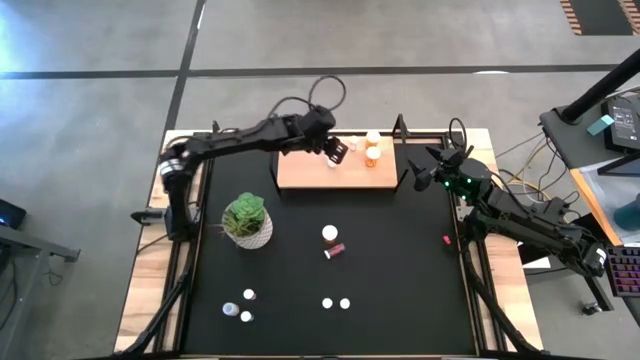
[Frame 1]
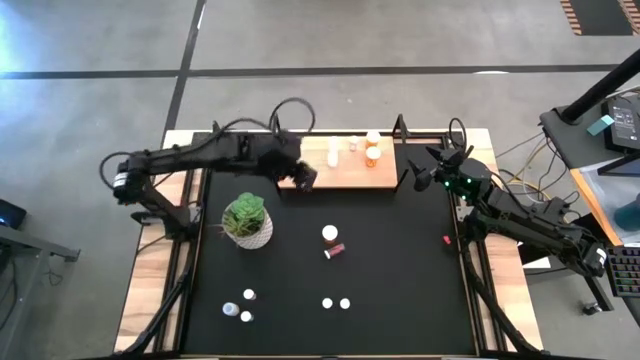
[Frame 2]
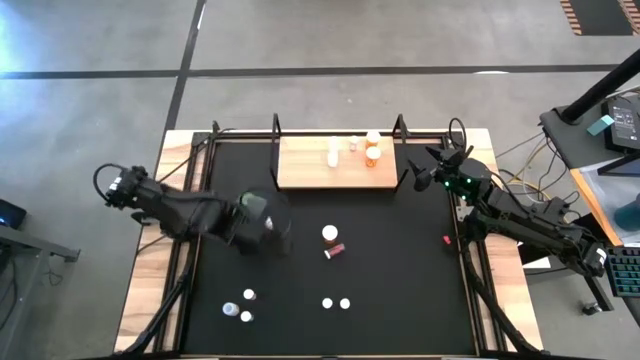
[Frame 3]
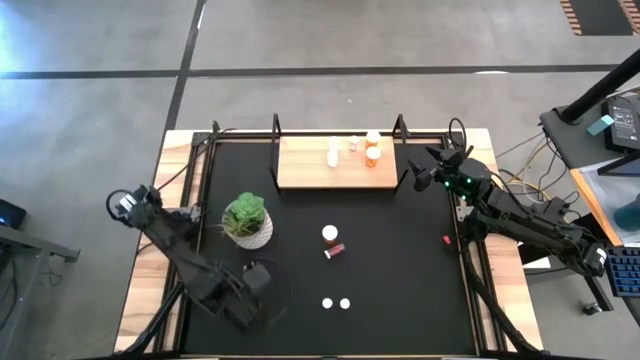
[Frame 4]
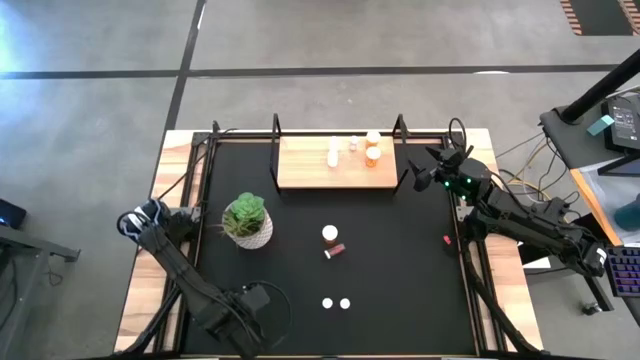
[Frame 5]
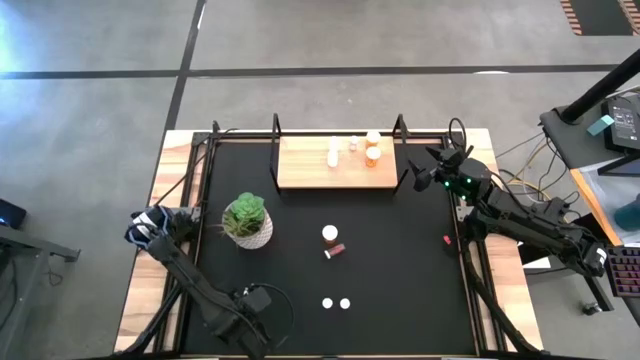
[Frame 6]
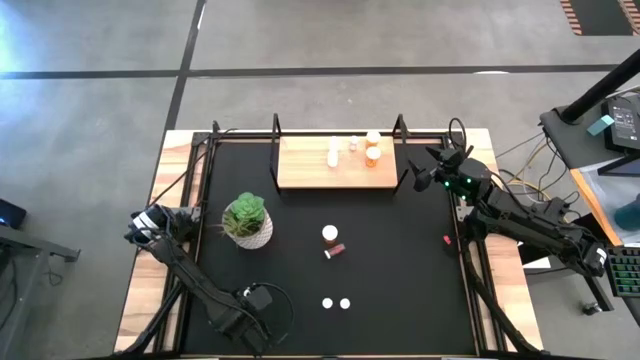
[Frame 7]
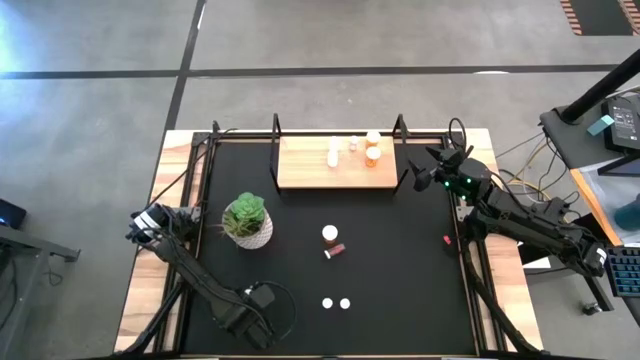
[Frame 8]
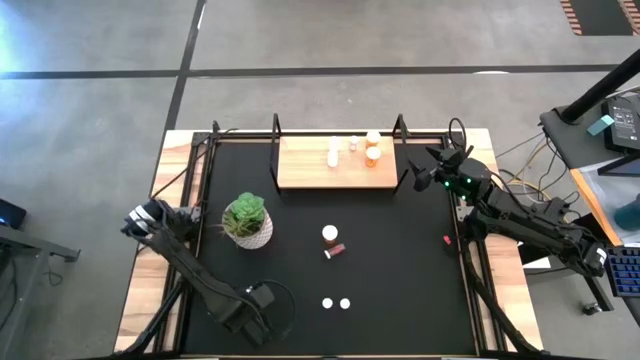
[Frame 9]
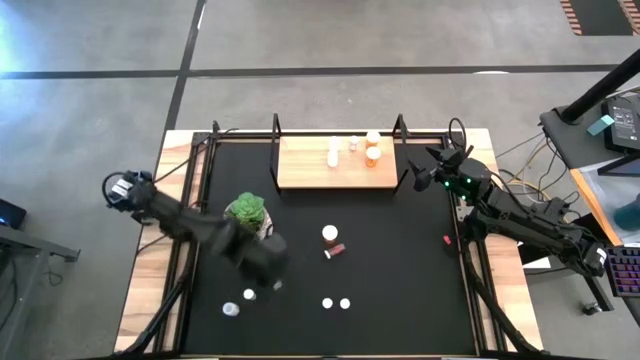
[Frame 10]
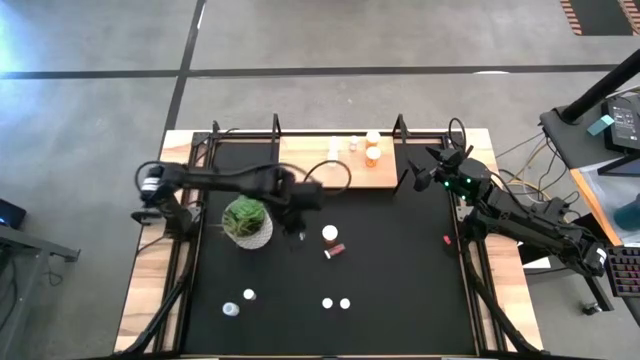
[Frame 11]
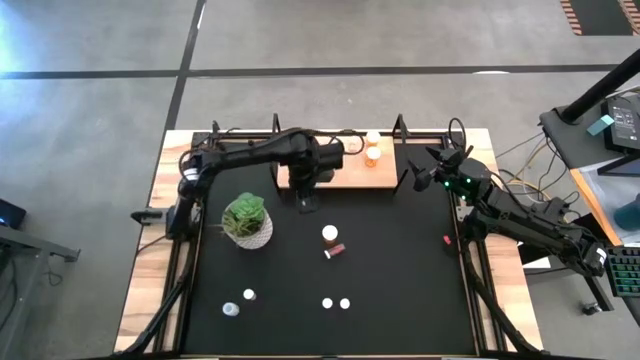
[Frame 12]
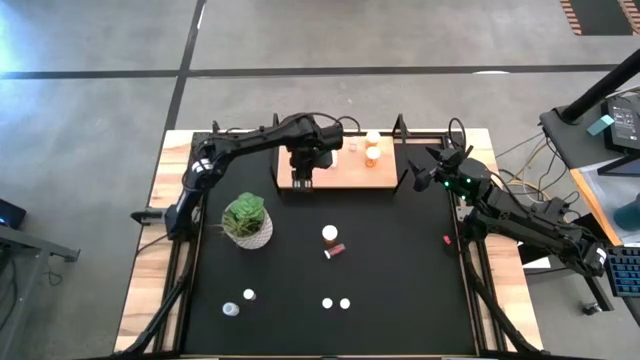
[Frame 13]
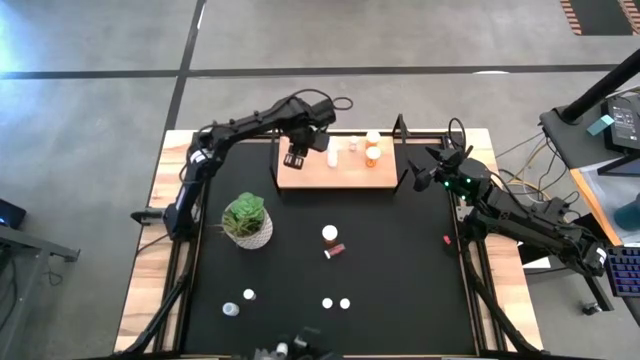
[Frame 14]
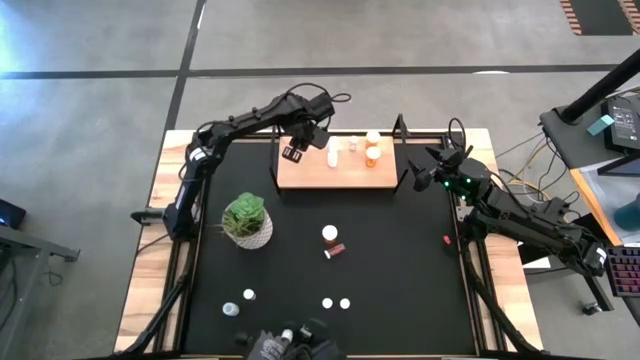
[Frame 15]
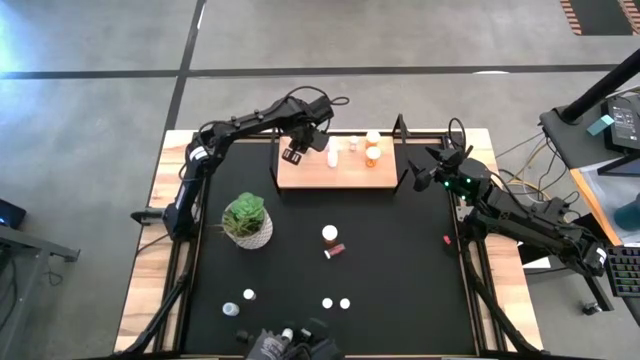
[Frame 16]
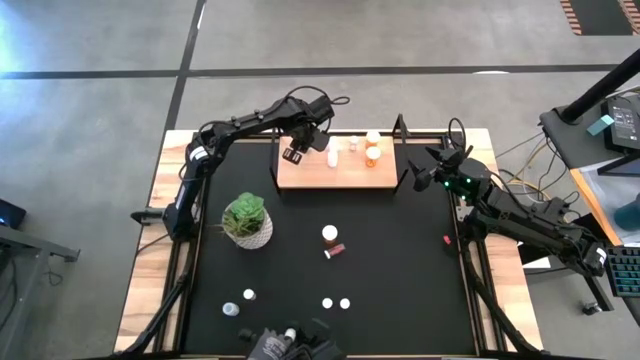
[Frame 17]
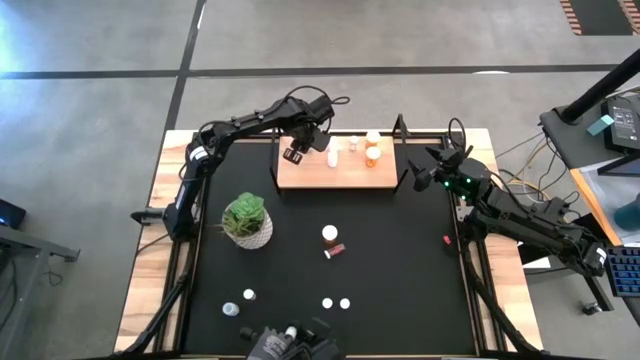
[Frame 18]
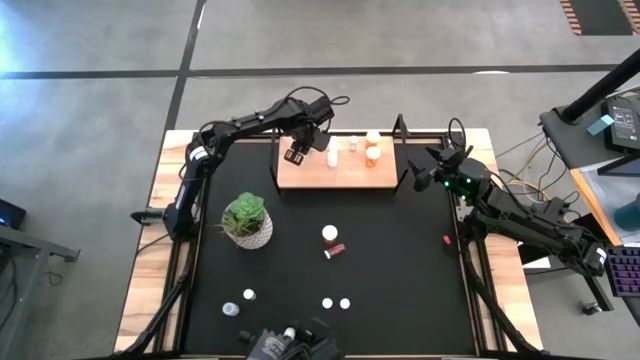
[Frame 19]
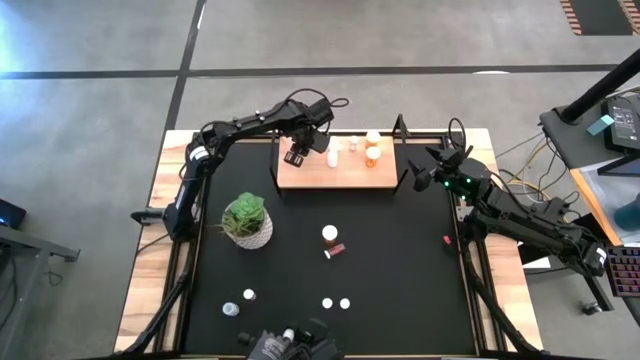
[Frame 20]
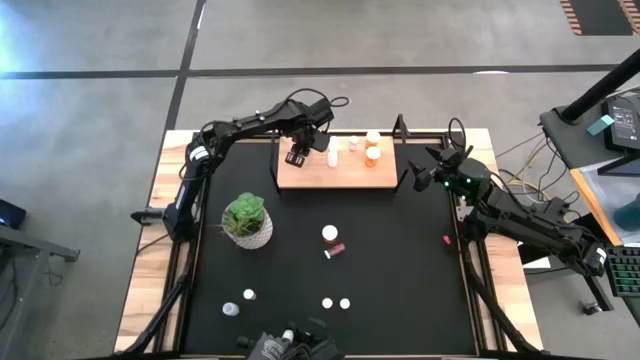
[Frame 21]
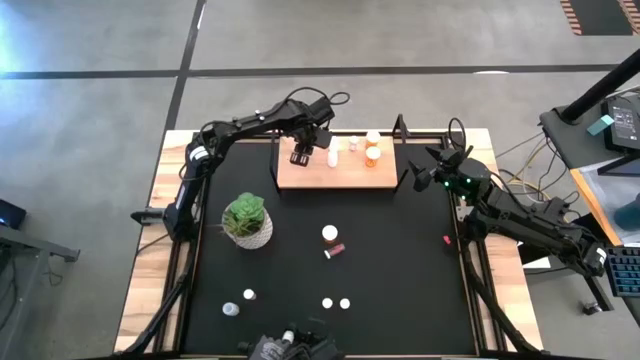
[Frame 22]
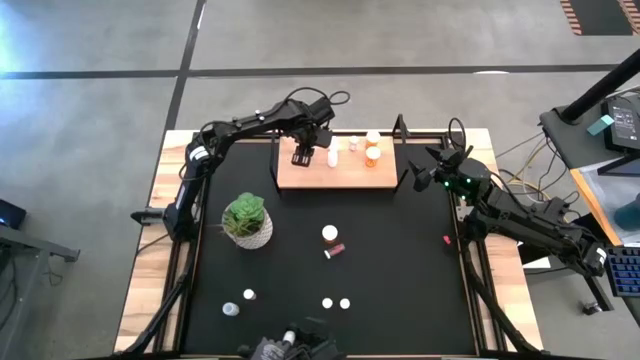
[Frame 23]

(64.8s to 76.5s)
Task: Pick and place medicine bottles onto shelf by color
Put the bottom left blue pill bottle on the shelf

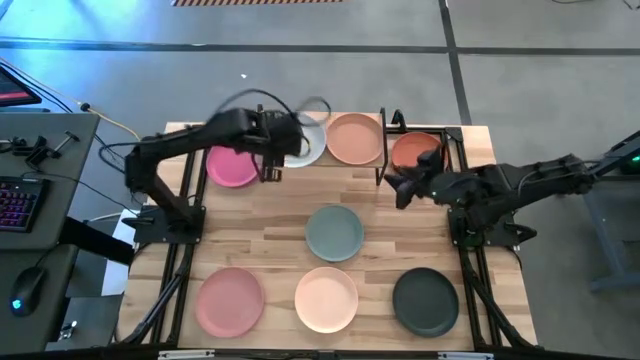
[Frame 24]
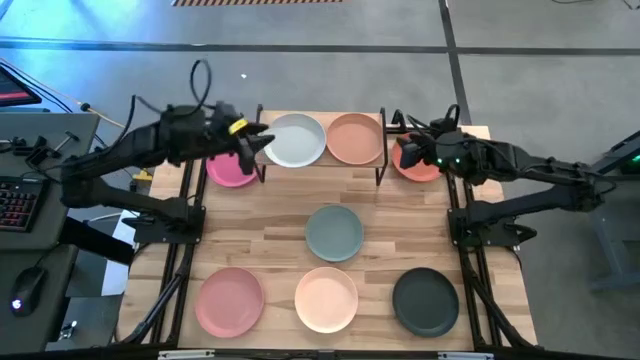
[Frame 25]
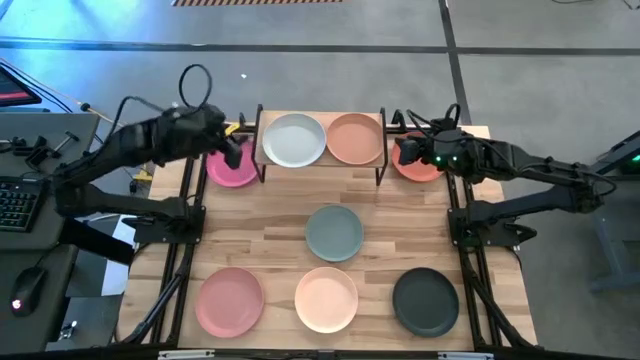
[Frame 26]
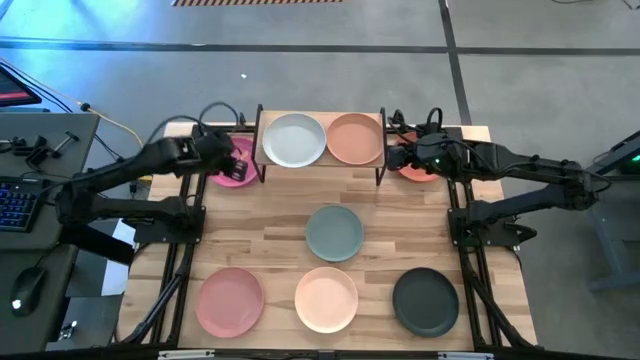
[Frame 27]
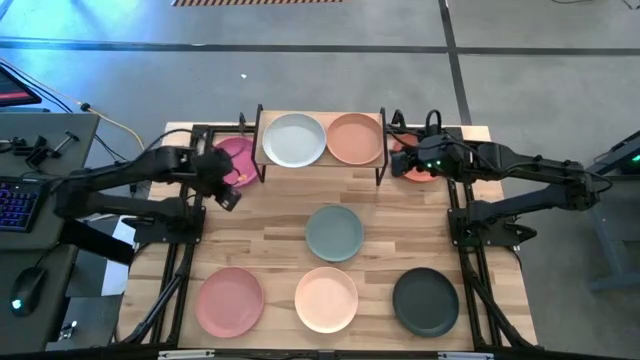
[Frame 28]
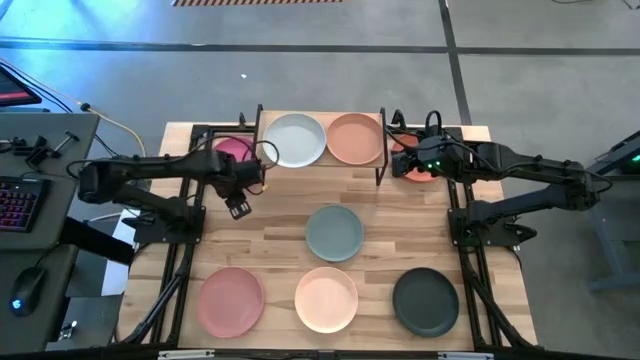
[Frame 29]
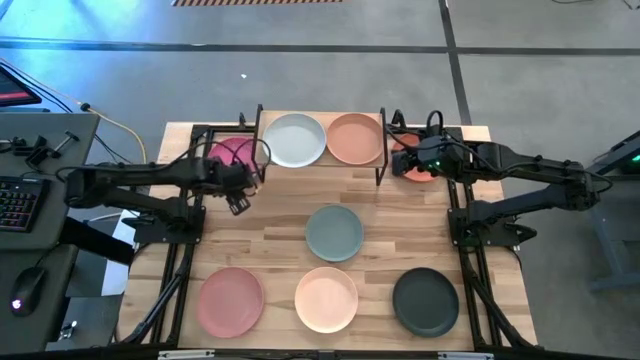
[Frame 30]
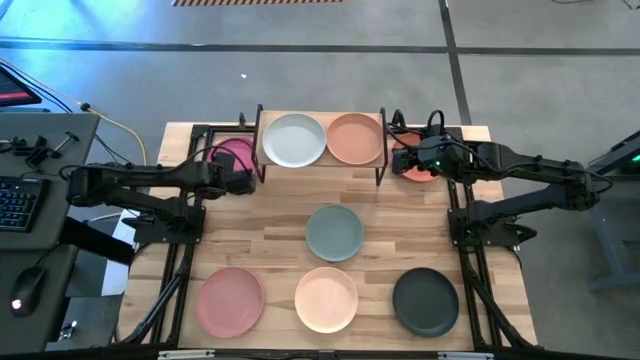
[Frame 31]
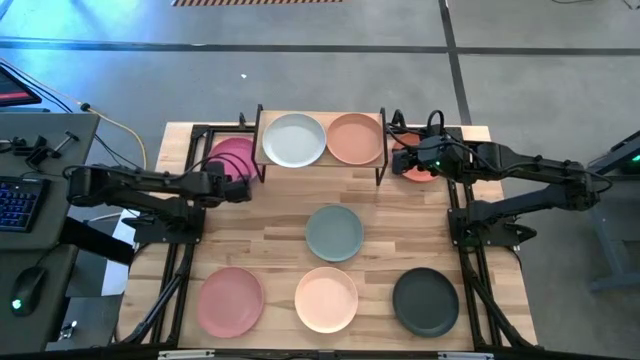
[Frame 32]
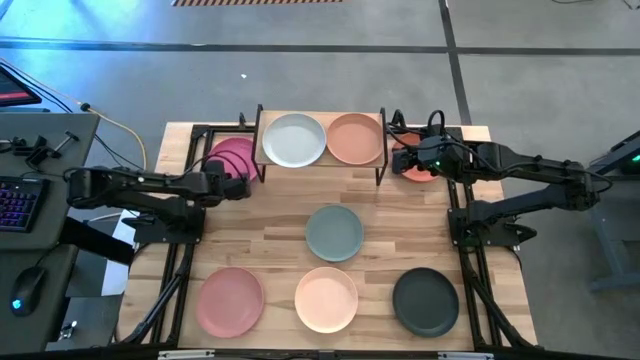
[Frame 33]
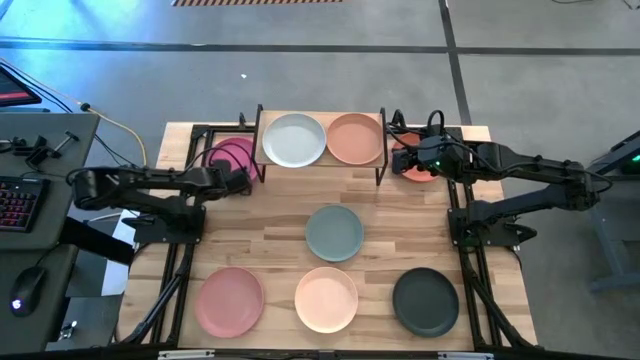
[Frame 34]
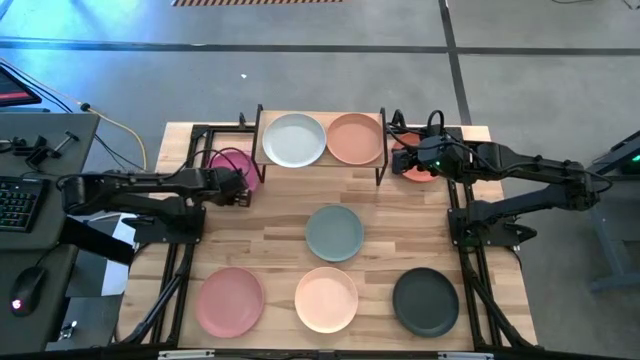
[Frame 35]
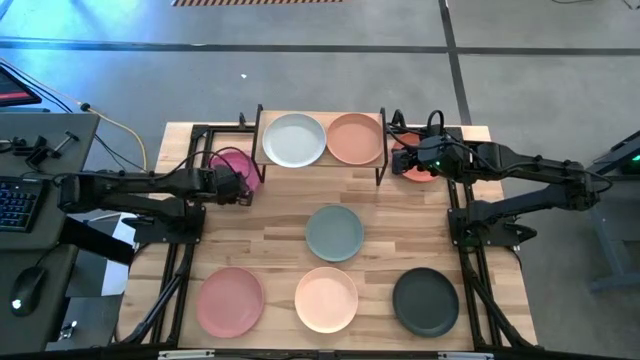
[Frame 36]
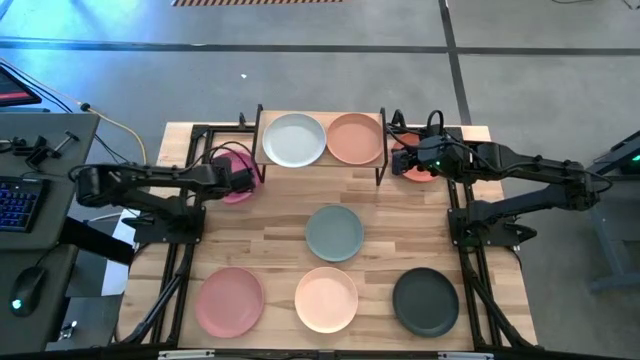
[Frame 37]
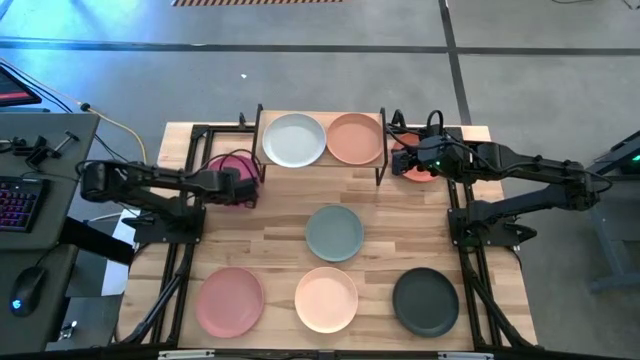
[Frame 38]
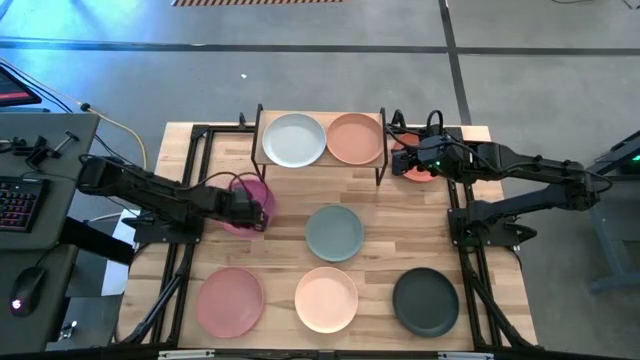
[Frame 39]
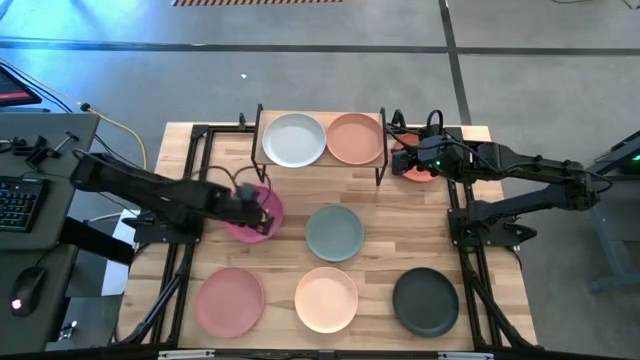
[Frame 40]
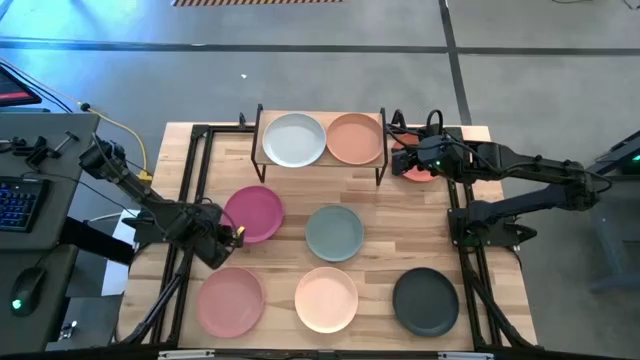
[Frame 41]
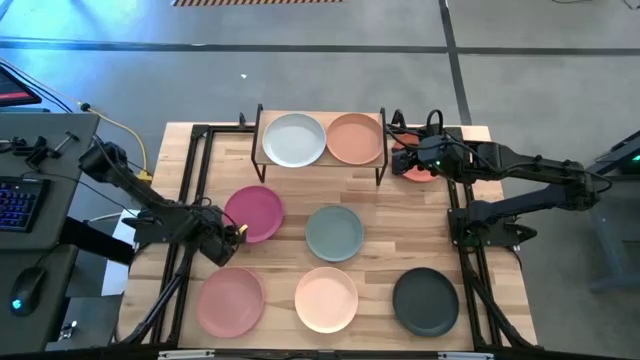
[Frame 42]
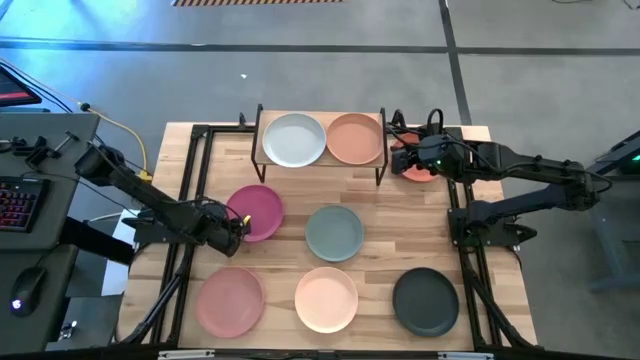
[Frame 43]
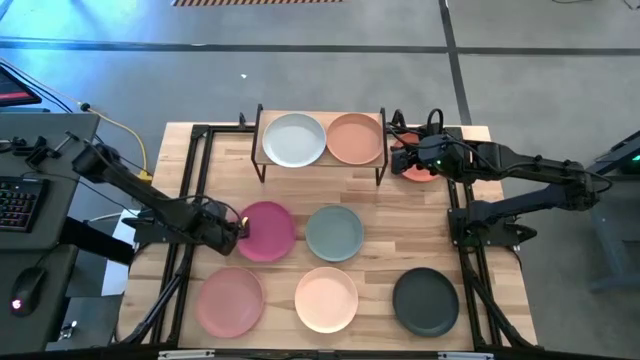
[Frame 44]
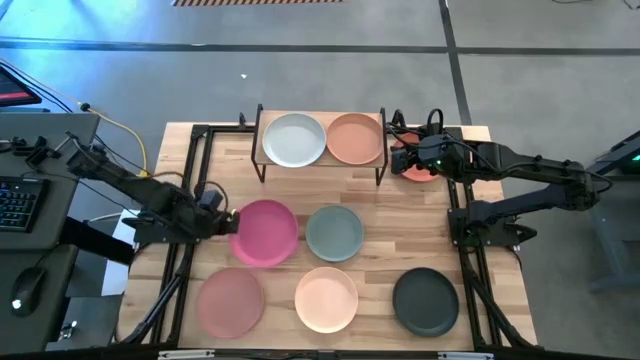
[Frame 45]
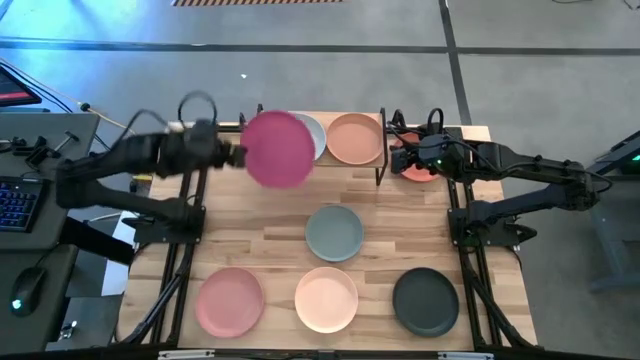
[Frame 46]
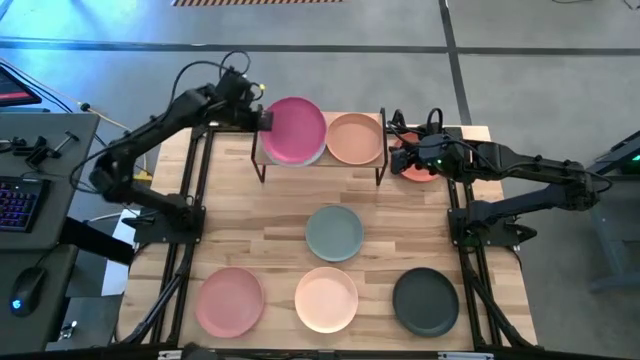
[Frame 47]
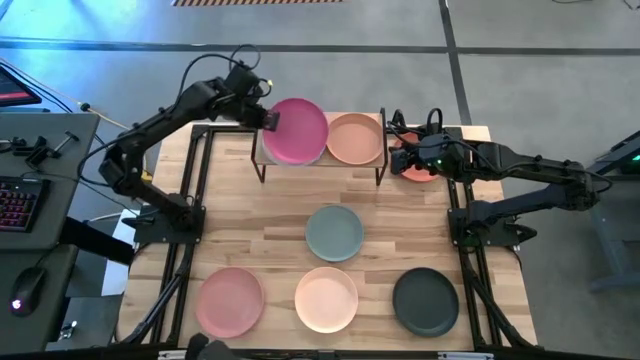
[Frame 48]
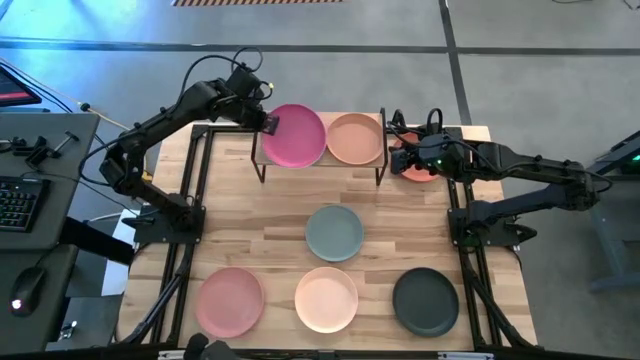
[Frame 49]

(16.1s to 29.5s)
Task: Place and stack plates onto a shelf
Stack the pink plate on top of the white plate on the shelf
